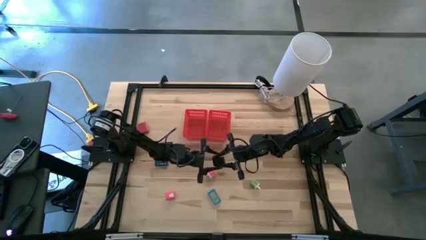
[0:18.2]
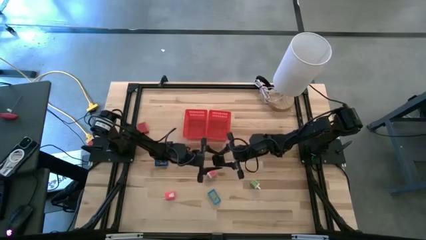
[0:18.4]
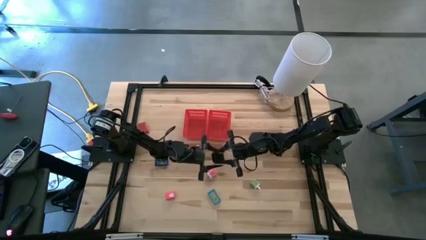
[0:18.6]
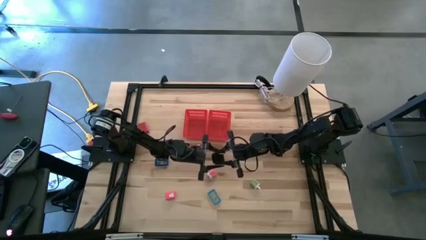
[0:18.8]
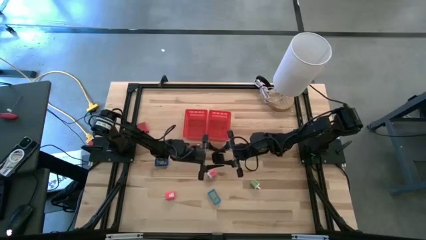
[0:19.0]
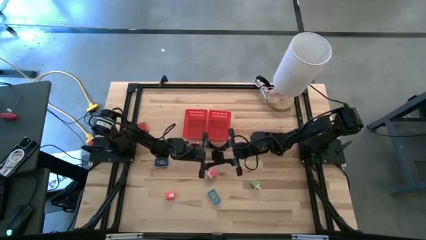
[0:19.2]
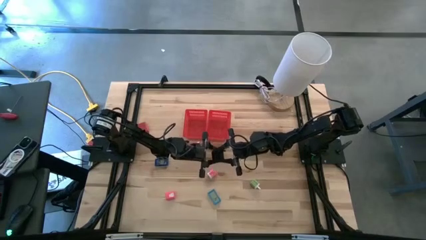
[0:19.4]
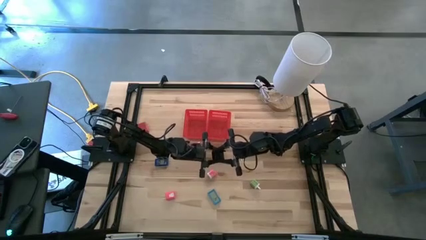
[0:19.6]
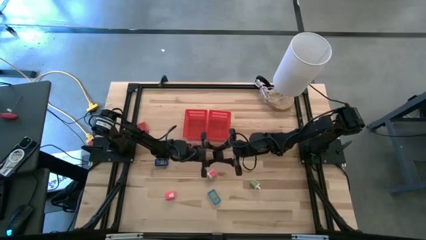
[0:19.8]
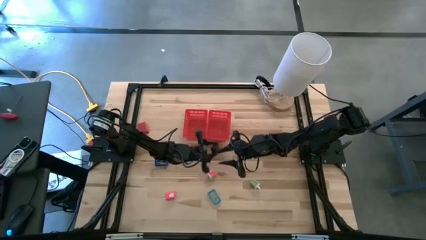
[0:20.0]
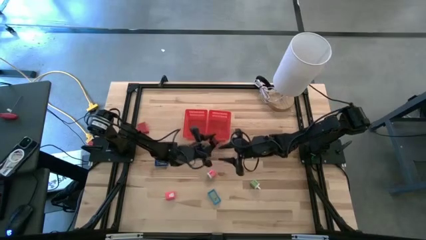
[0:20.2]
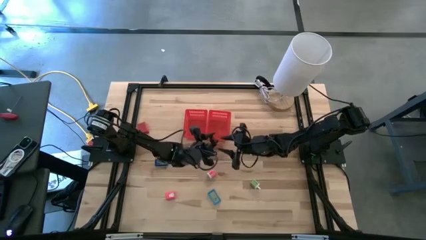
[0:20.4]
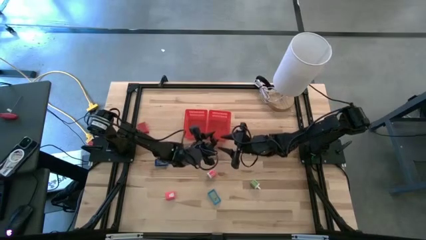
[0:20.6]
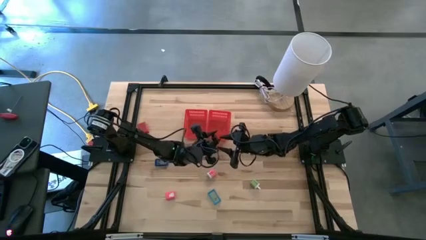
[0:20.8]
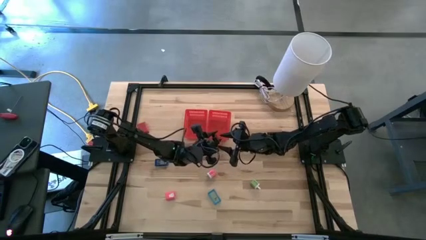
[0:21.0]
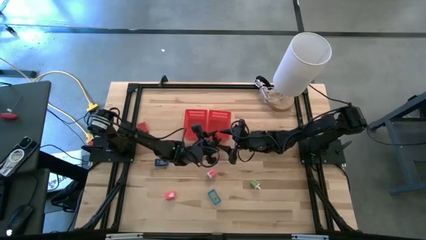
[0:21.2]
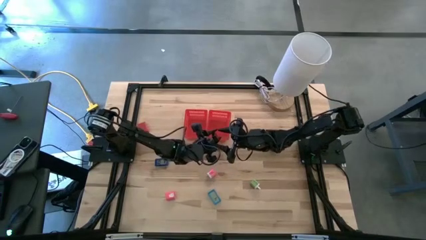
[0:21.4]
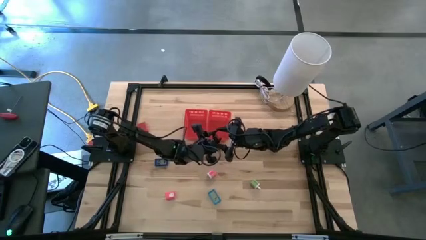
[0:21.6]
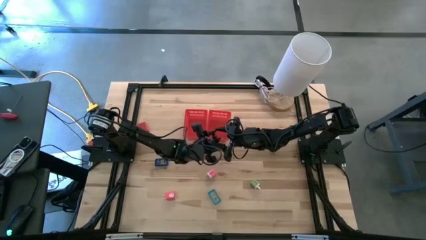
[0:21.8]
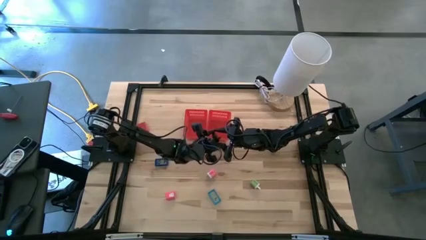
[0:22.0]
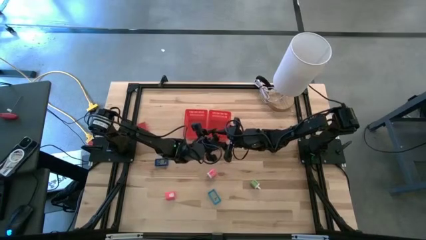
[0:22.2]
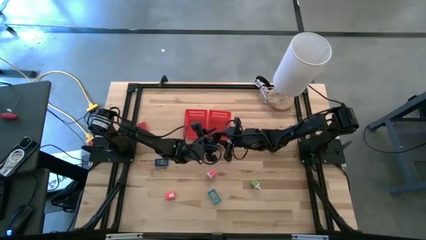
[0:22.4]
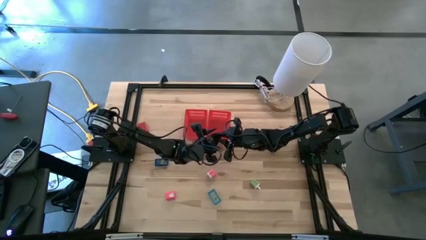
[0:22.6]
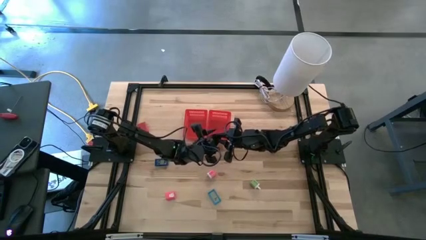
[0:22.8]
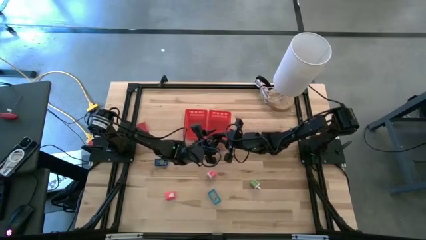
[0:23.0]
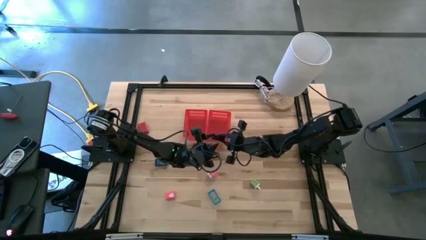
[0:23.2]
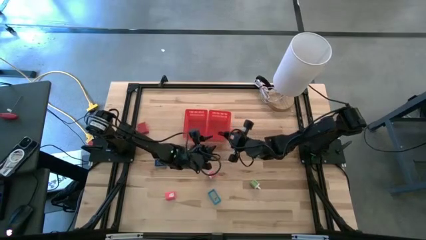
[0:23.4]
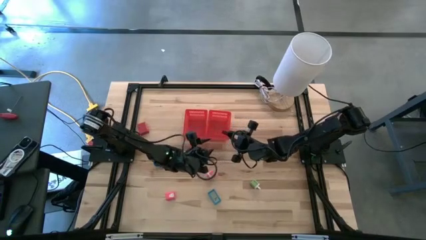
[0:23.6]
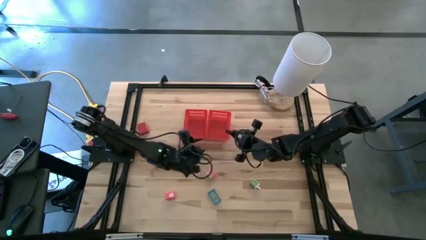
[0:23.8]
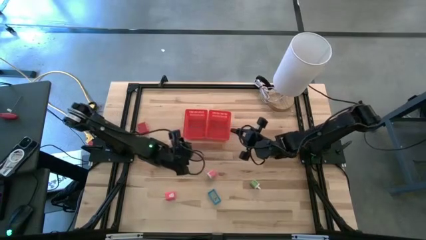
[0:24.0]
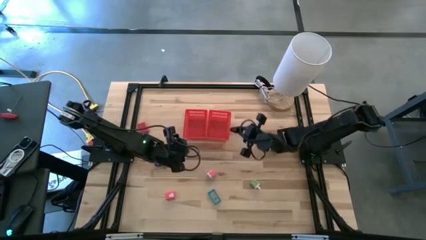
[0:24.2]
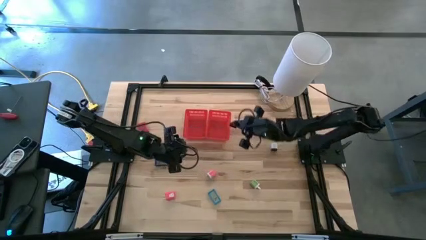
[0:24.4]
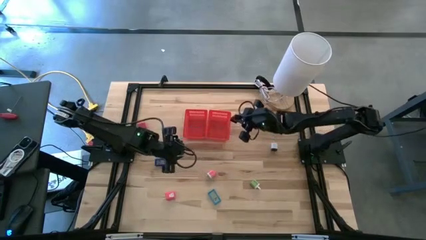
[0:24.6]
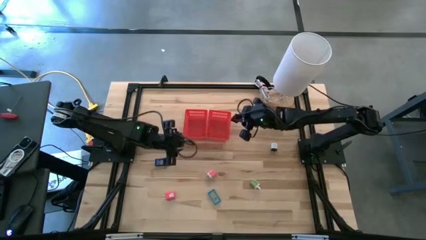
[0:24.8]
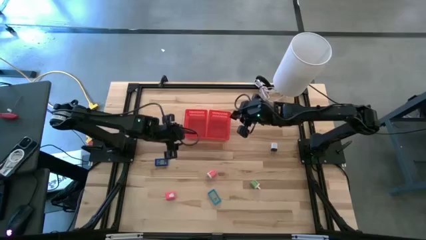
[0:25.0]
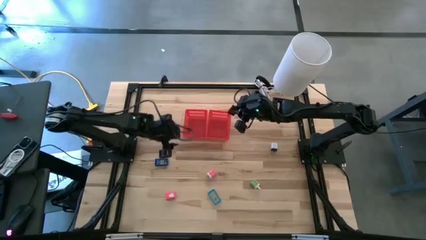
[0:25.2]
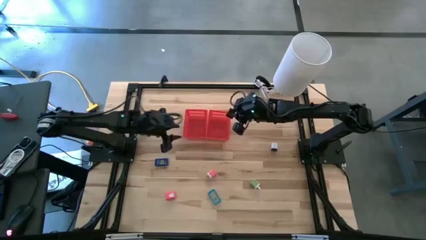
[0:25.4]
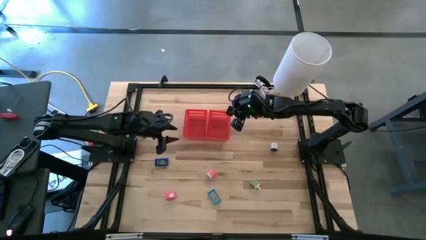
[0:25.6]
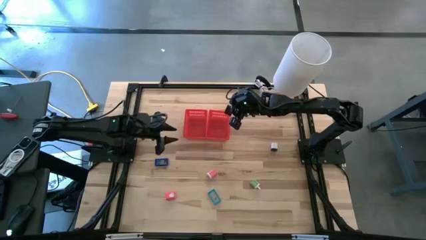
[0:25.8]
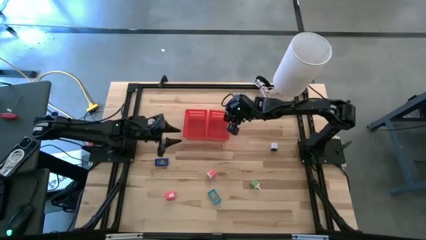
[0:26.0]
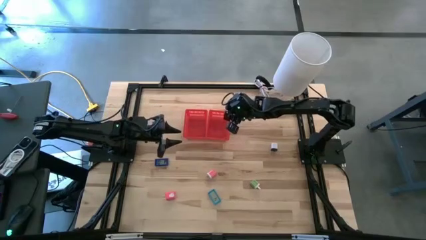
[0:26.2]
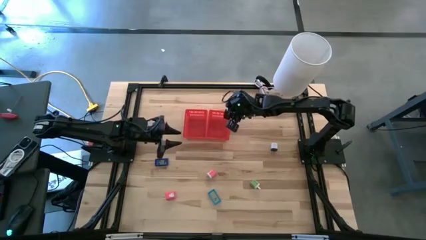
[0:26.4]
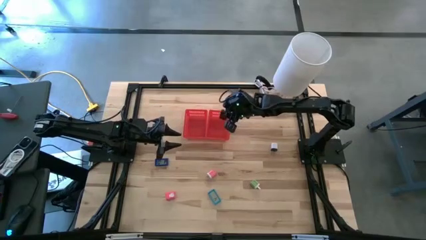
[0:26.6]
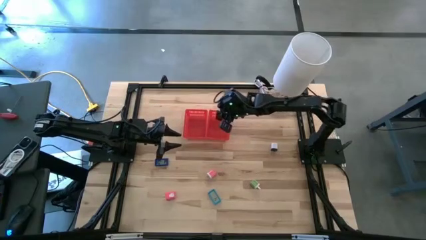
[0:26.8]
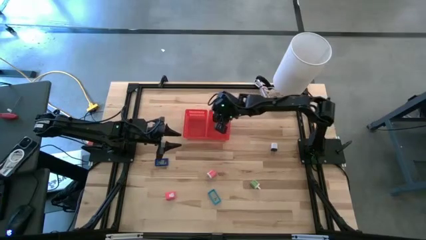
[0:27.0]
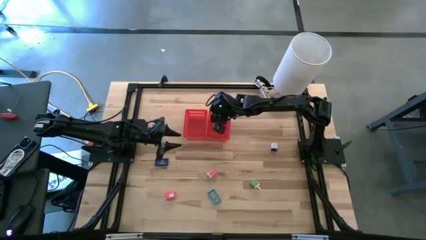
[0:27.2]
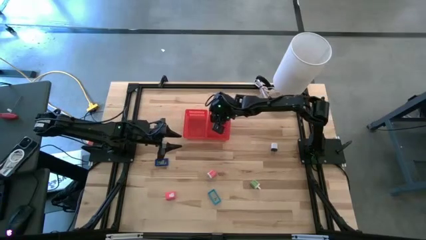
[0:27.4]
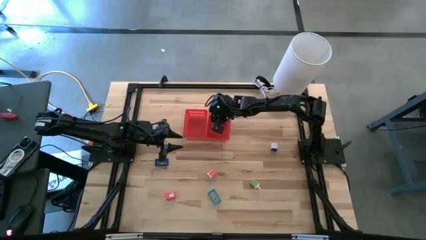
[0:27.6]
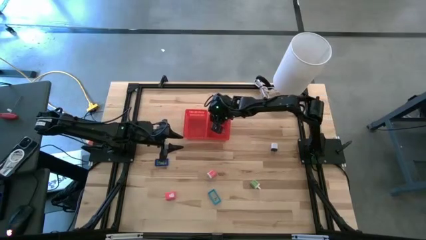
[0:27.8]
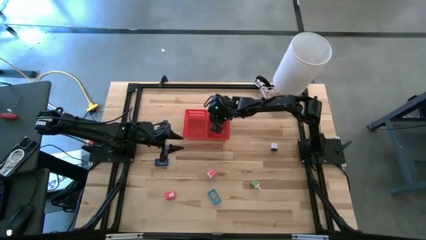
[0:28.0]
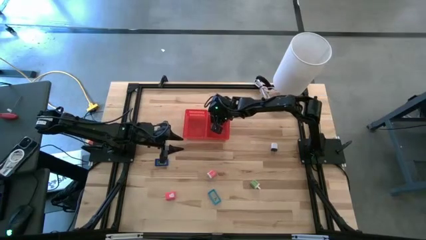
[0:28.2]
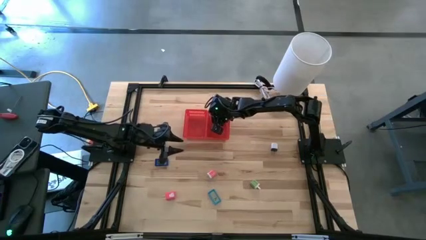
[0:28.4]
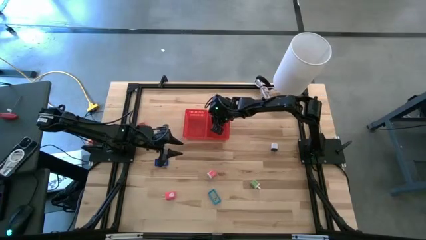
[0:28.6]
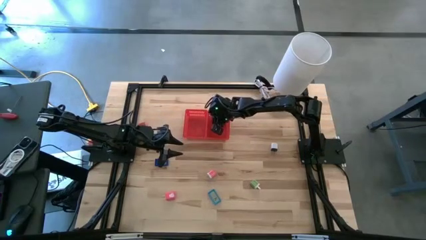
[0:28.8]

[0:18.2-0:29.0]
Task: Pick & Place Office items
Put the black digital clock into the right red bin

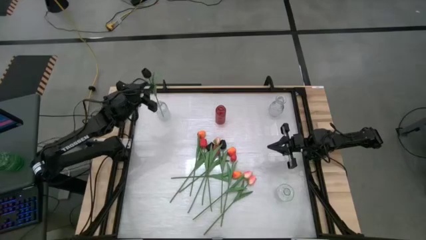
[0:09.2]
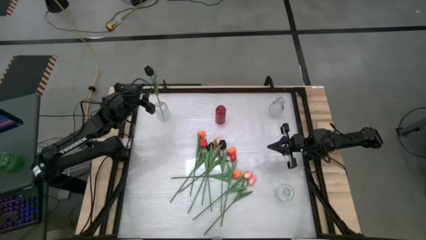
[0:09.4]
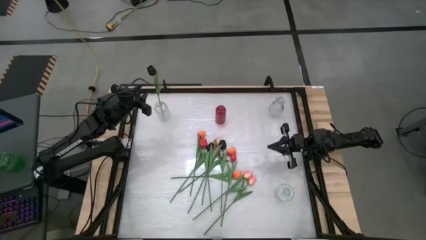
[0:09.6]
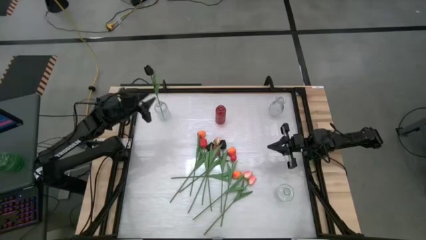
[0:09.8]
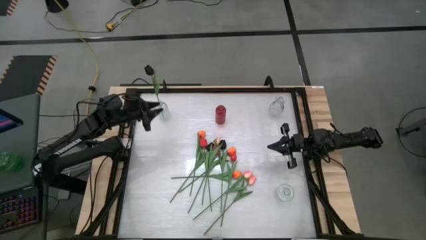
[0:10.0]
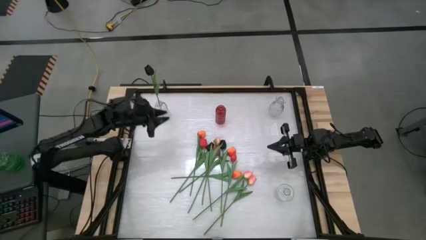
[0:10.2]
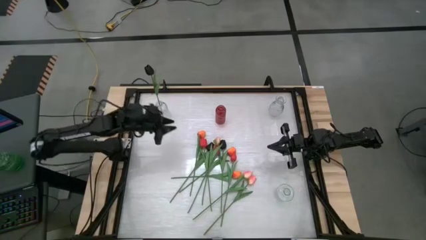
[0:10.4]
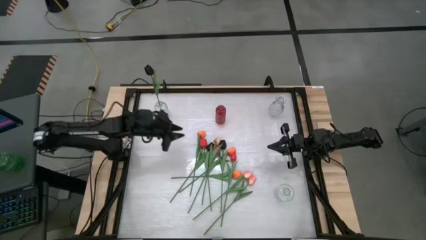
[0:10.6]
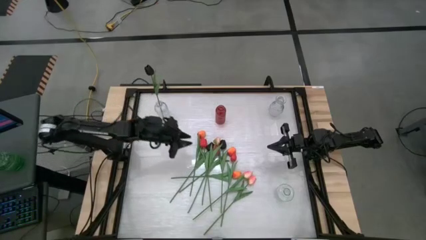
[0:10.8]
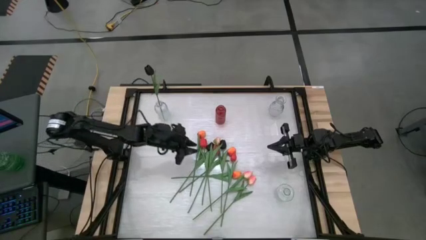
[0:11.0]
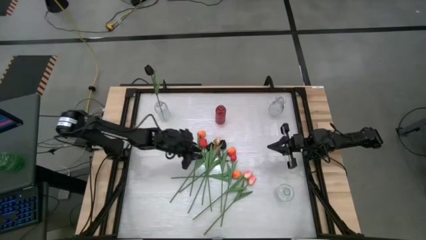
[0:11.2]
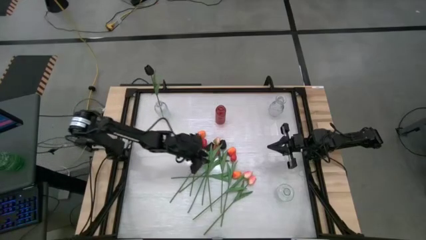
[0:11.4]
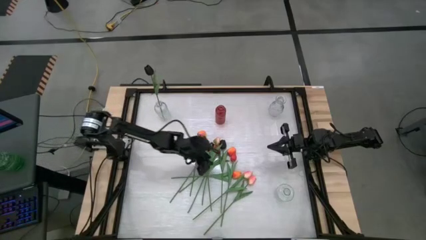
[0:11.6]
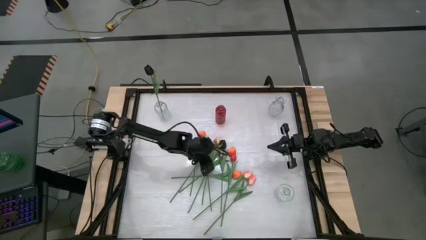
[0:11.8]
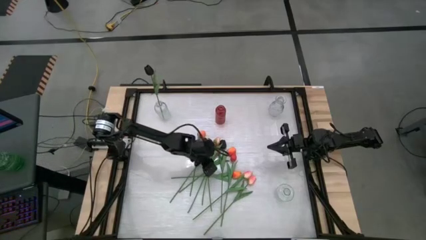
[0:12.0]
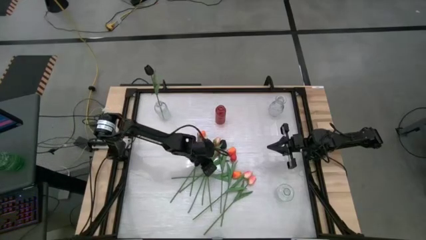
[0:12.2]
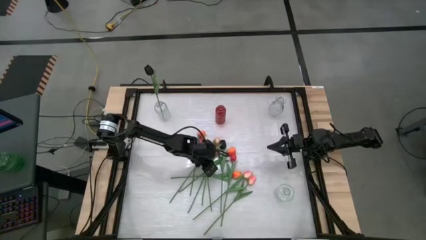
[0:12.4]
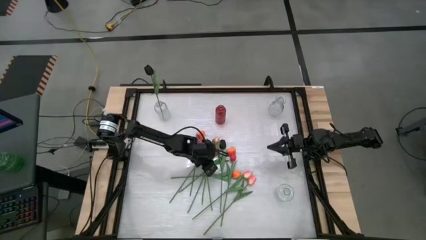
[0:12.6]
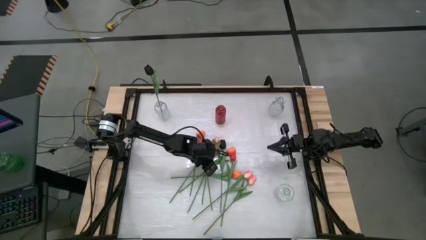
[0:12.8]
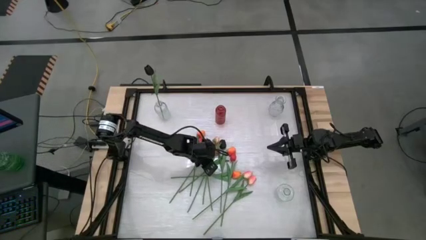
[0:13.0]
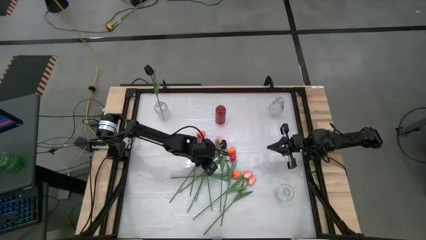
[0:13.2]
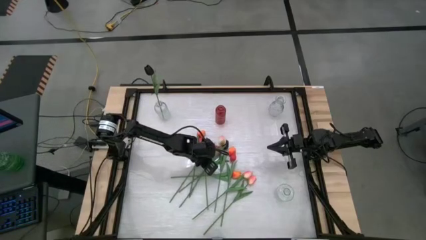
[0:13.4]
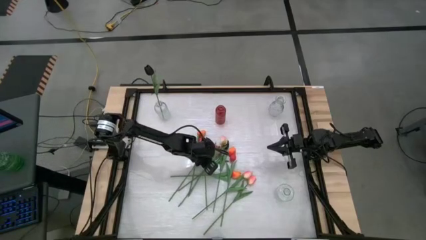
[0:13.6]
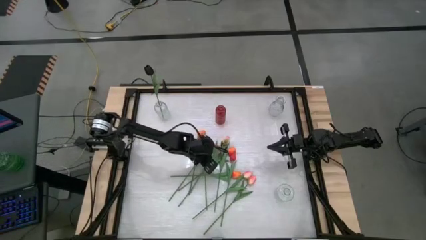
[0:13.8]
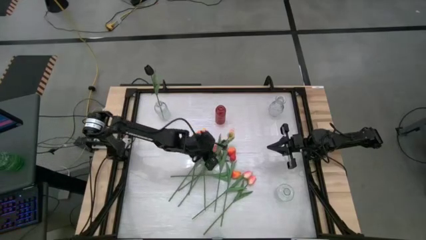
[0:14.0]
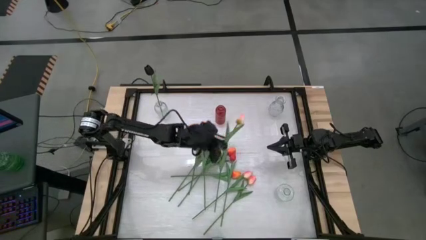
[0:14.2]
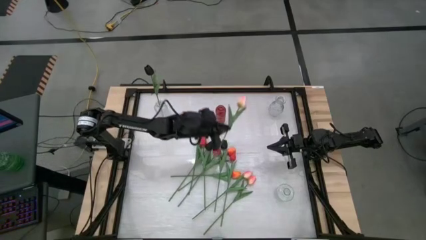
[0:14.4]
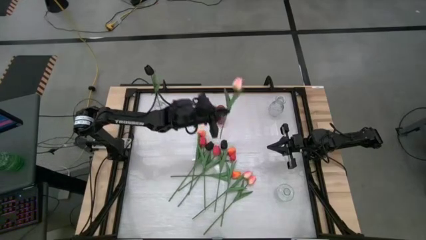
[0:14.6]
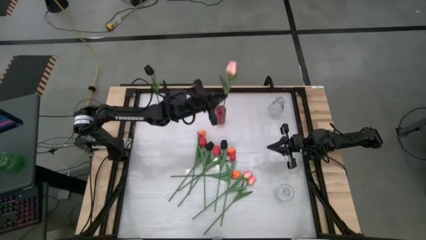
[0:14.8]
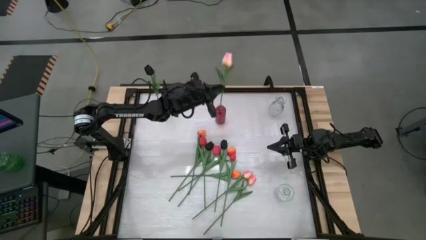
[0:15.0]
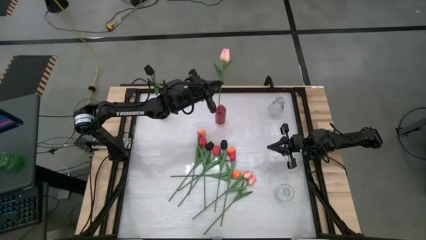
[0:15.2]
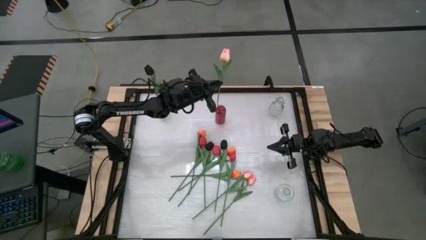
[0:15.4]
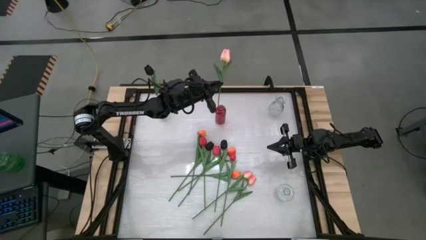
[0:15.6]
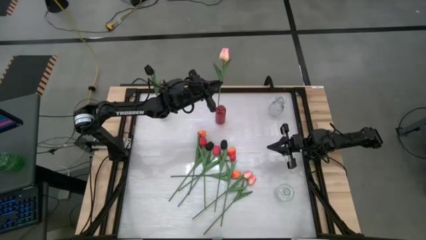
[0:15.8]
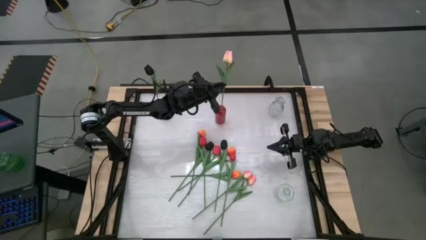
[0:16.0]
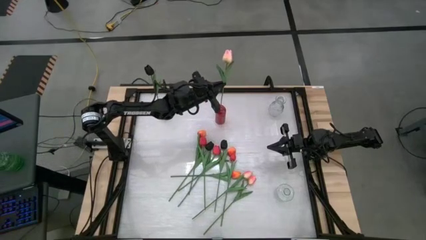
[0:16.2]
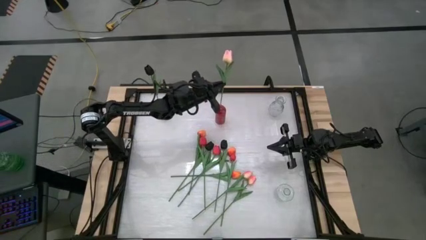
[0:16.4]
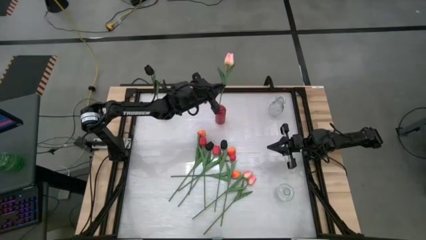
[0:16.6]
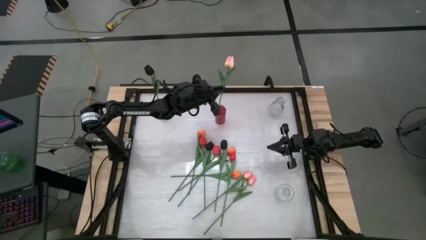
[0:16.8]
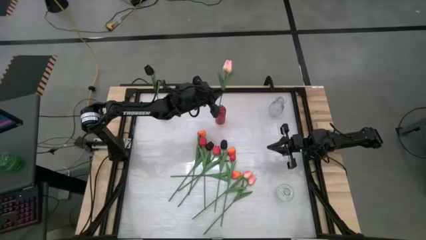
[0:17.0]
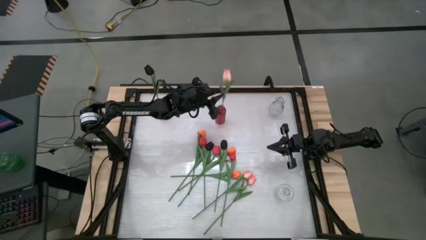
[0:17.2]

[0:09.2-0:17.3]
Task: Sort flowers into vase by color
Put the top pink flower into the red transparent vase
